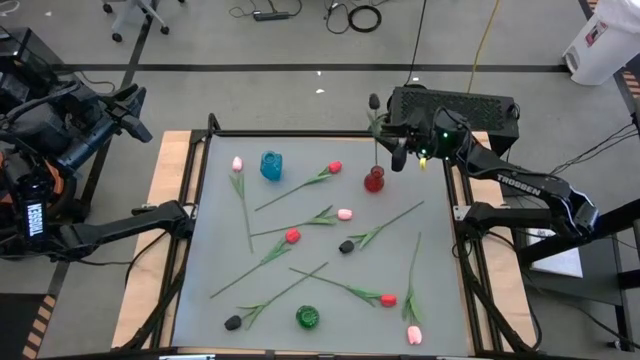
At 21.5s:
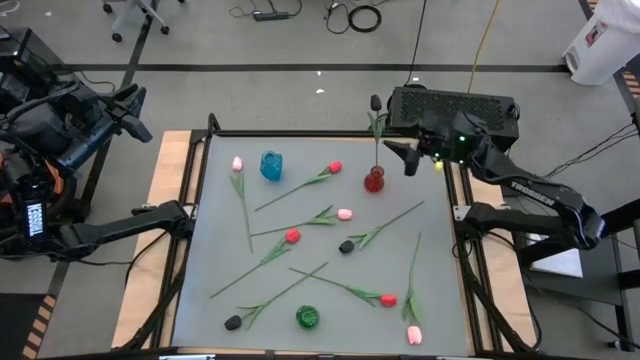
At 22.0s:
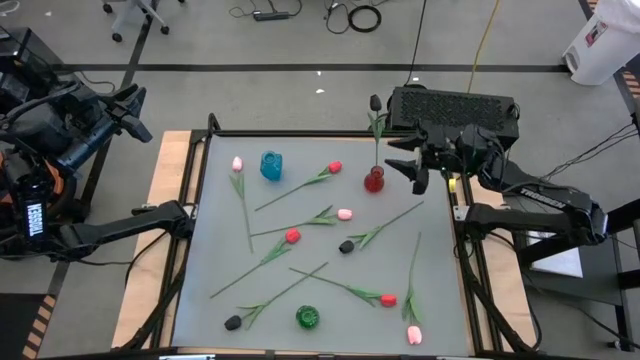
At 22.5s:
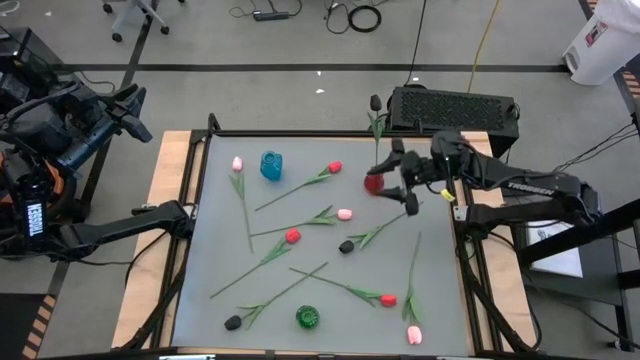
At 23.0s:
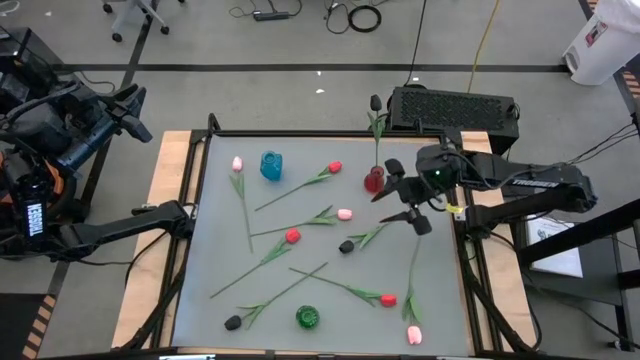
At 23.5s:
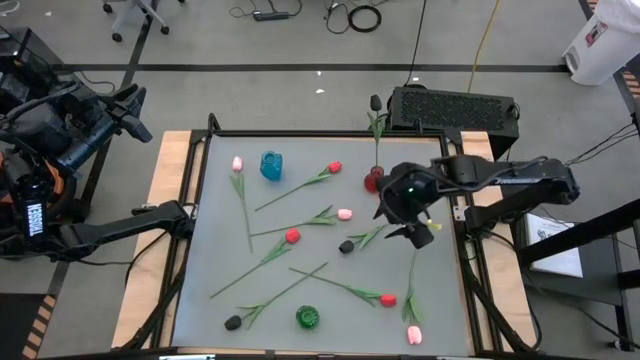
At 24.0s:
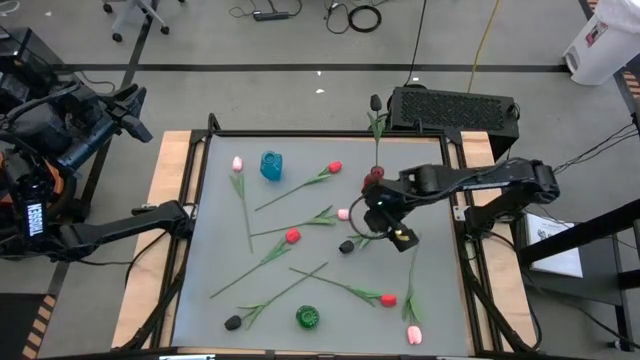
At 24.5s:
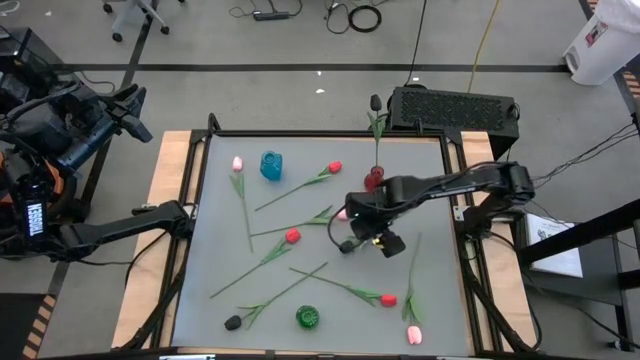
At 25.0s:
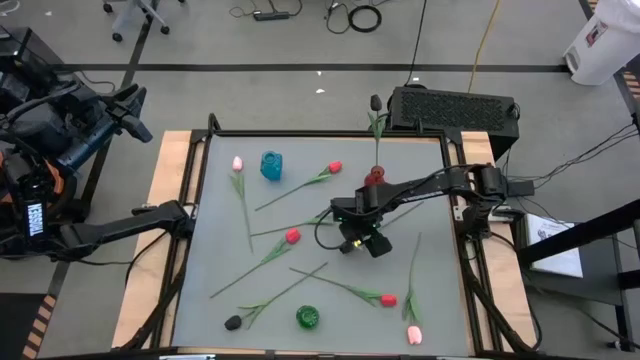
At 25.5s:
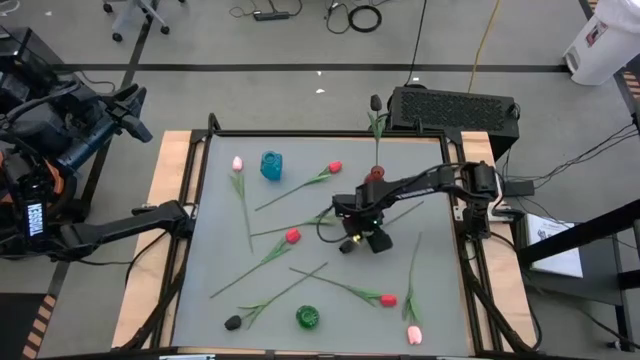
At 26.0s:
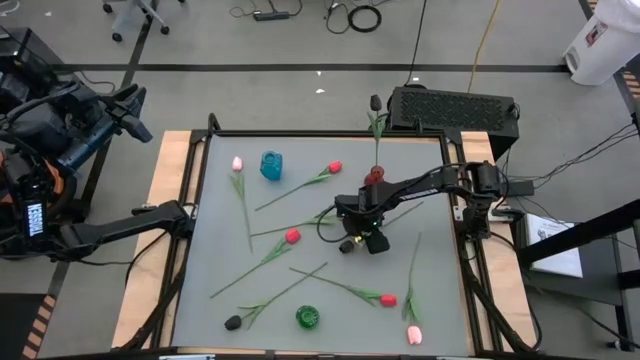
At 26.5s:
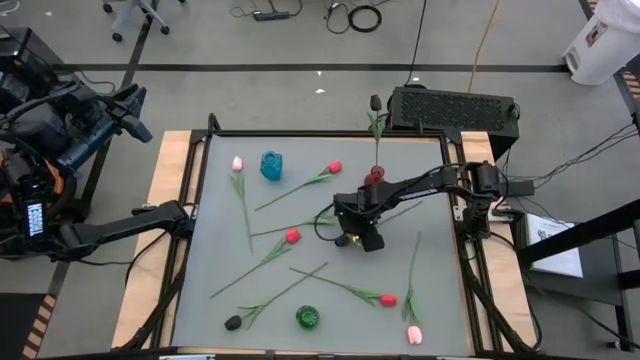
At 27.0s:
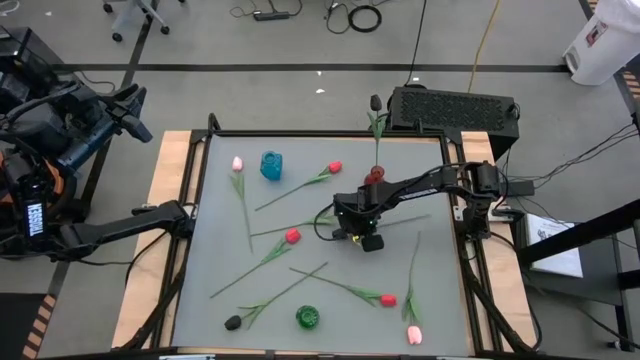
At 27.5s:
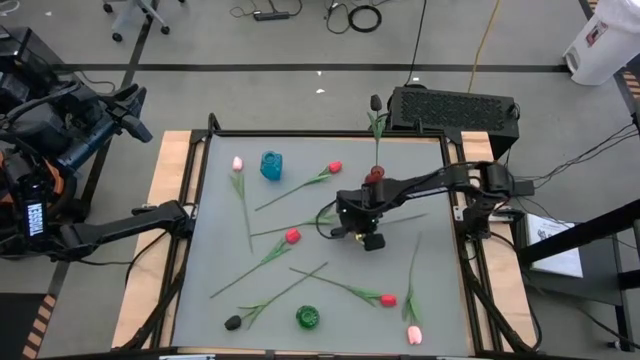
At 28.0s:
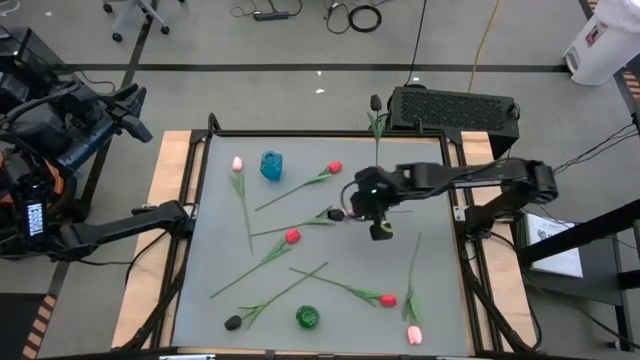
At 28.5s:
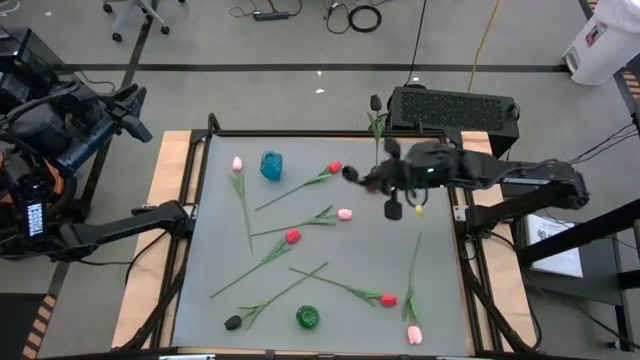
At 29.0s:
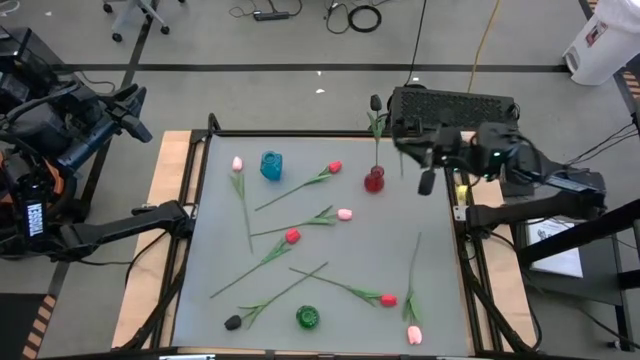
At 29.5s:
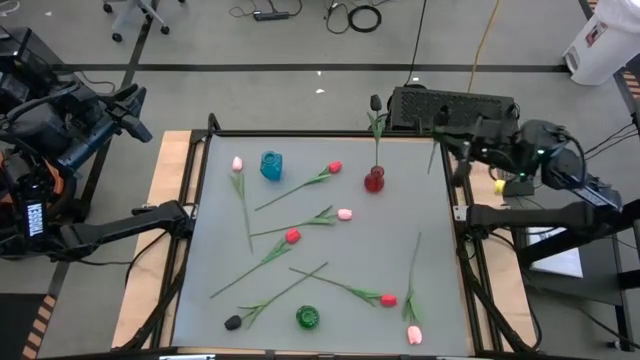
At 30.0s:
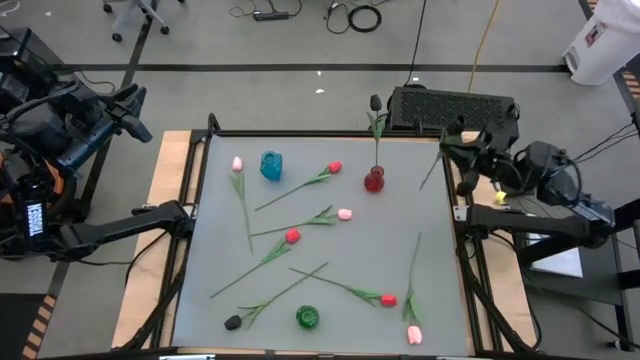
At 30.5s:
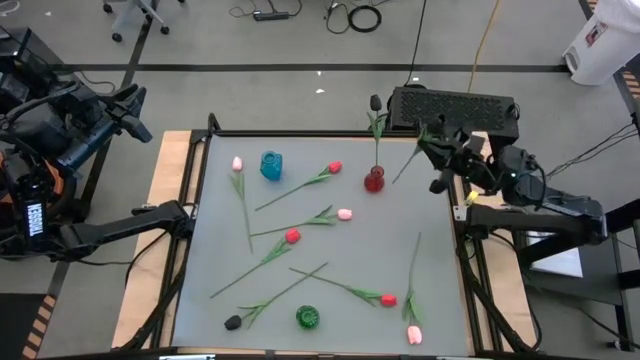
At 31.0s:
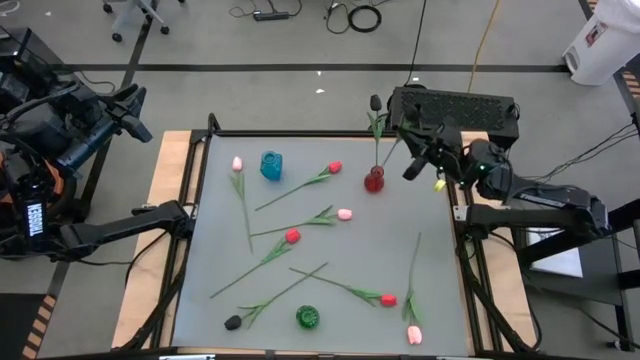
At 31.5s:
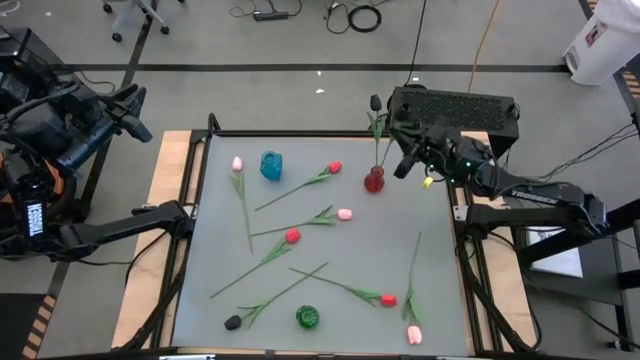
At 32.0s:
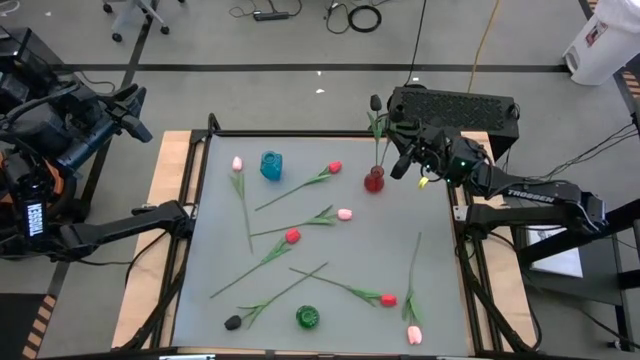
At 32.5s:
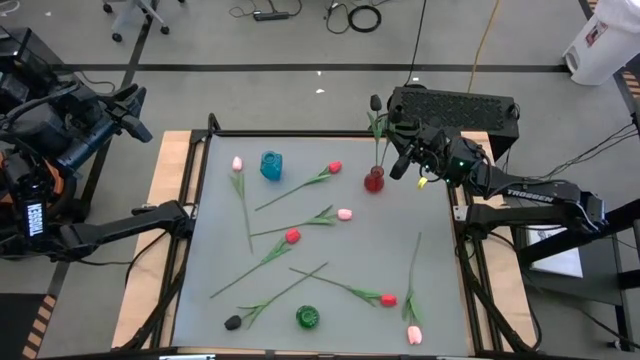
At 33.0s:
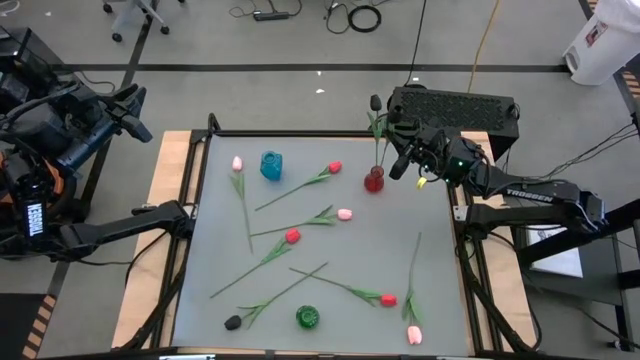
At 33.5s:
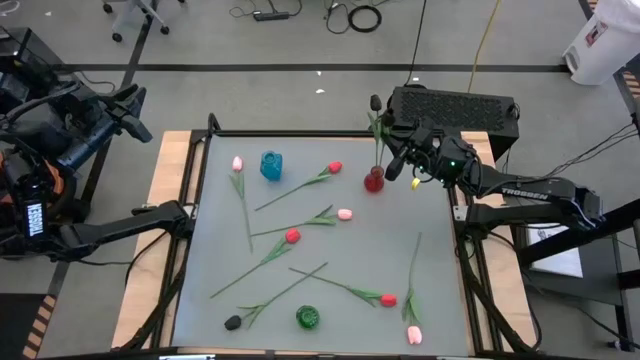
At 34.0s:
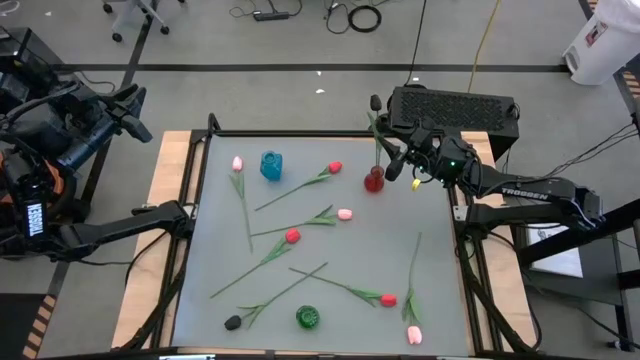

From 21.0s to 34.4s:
Task: Sort flowers into vase by color
Put the top black tulip into the red vase

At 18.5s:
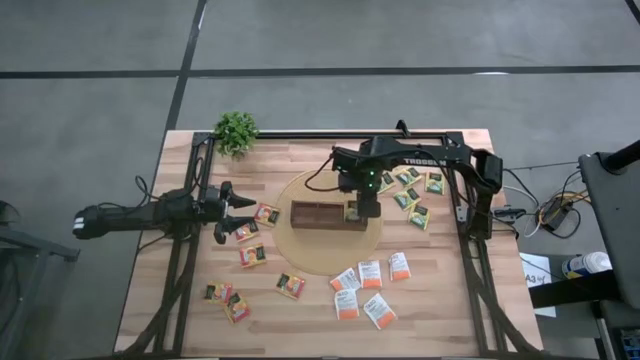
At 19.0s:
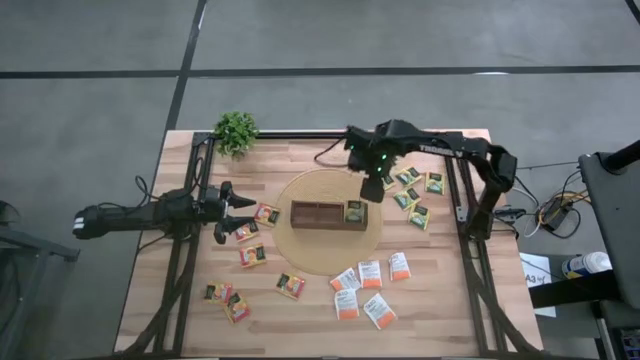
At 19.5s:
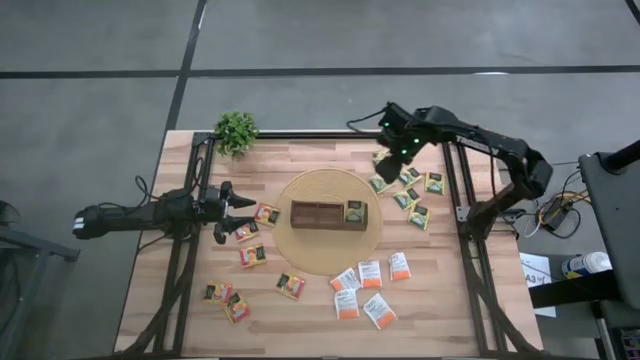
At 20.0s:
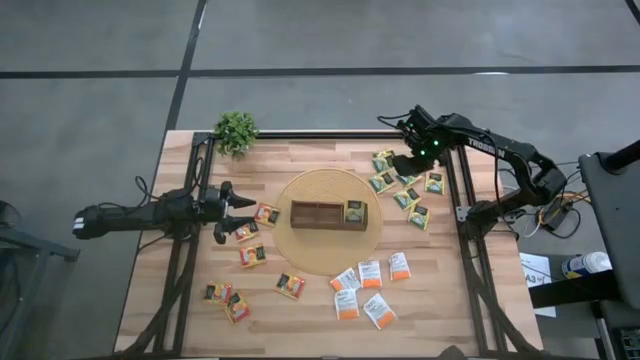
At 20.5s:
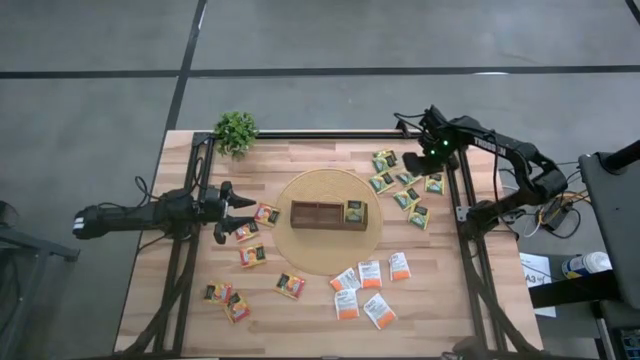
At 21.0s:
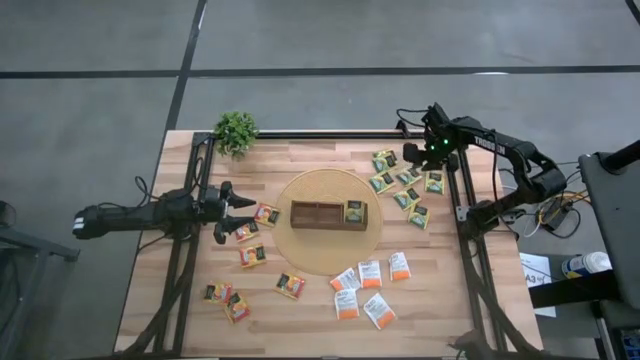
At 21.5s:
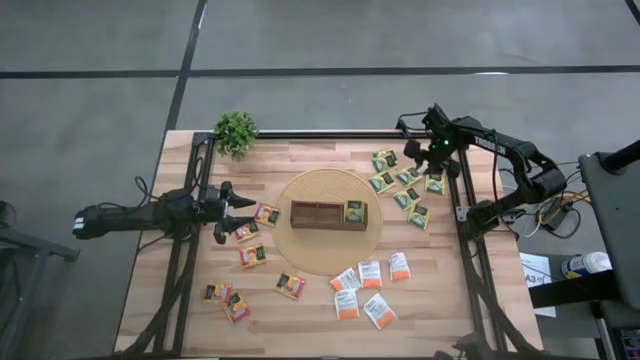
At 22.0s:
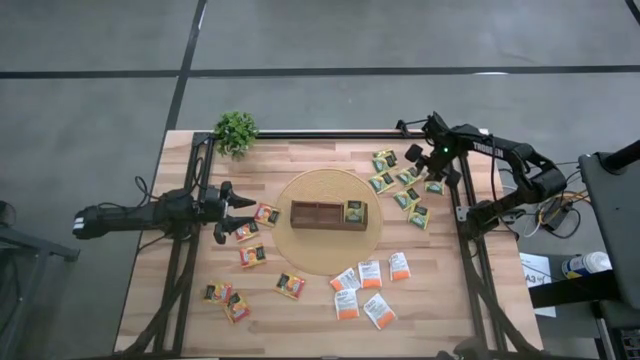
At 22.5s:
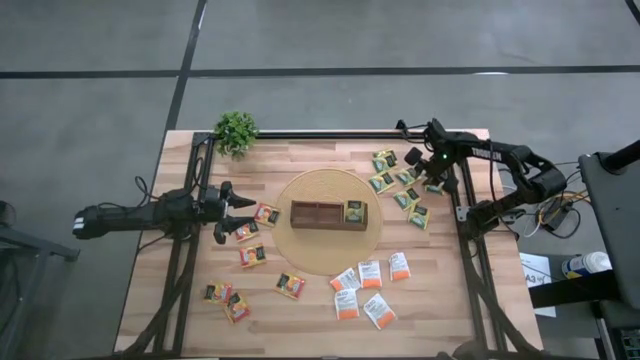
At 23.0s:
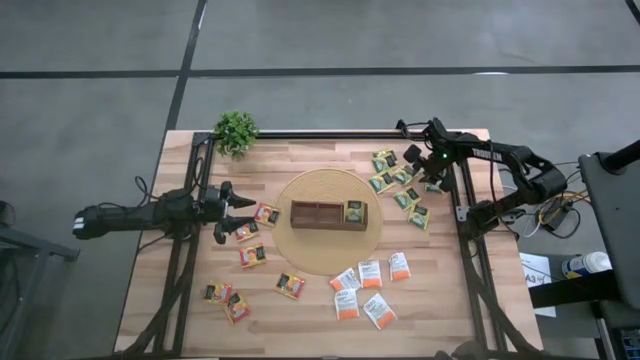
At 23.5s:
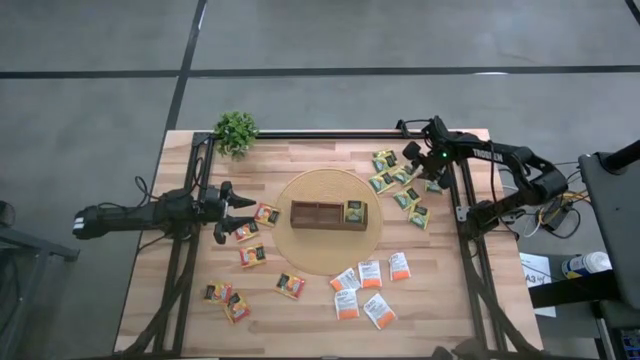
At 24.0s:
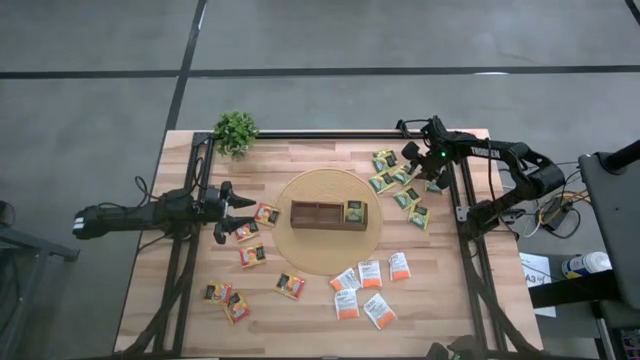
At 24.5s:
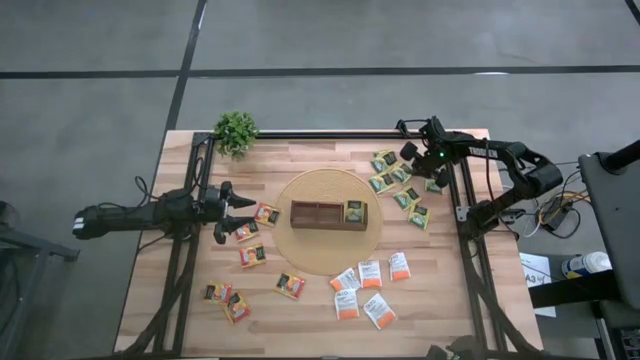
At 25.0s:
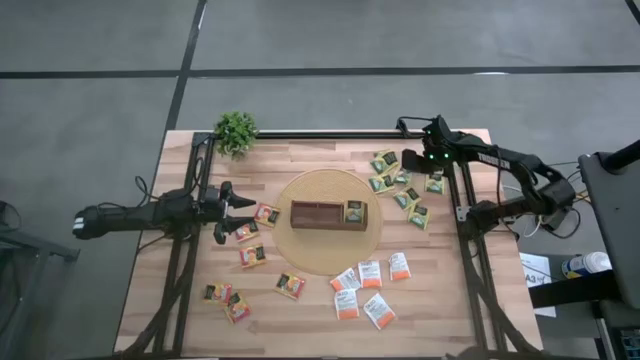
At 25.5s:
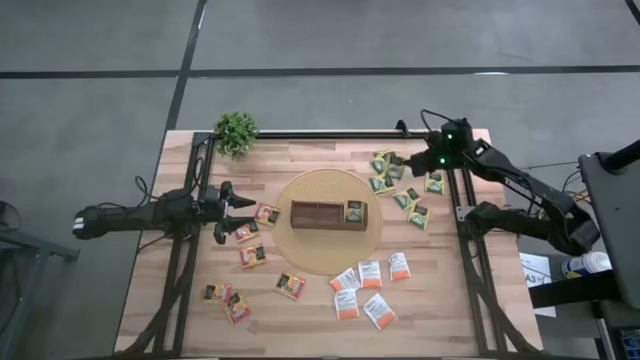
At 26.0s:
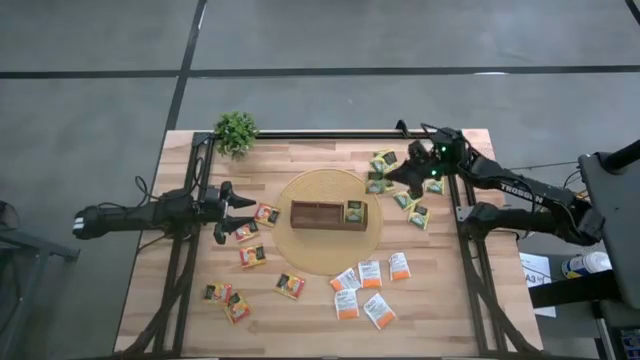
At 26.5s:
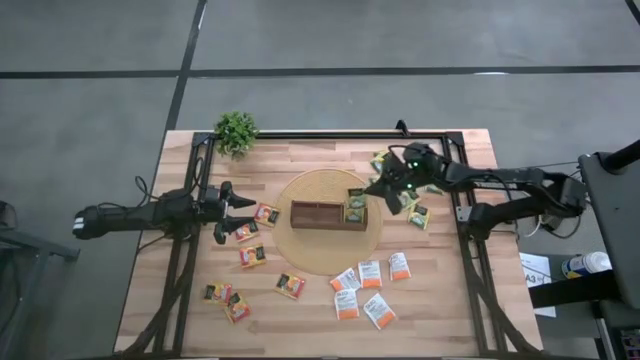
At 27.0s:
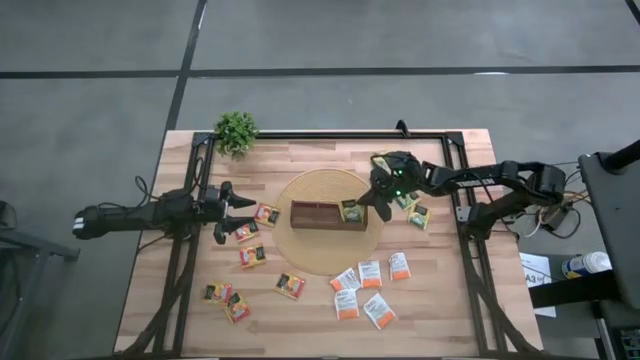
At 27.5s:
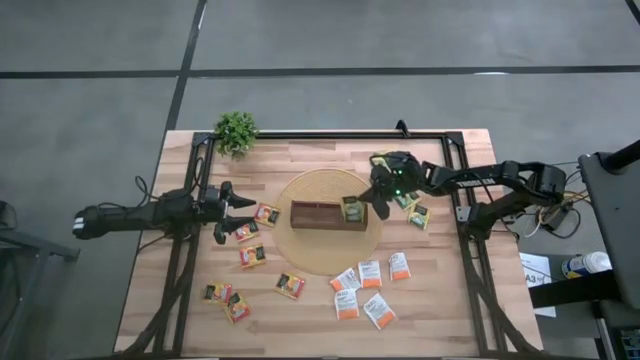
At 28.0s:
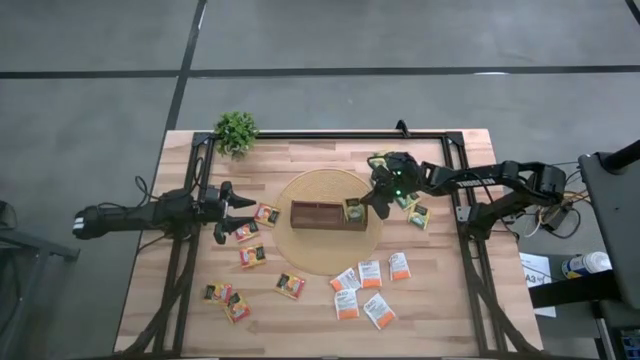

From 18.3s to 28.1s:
Task: Pick & Place Tea
Put the yellow tea bag into the right section of the wooden organizer
